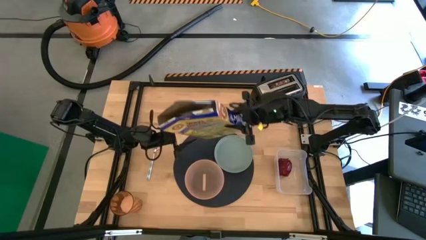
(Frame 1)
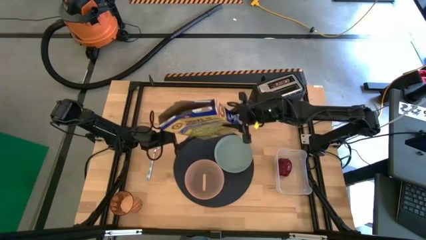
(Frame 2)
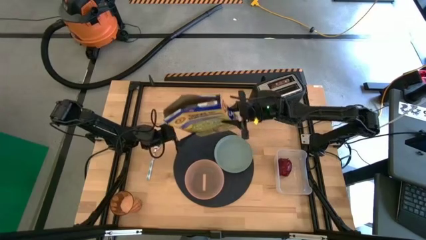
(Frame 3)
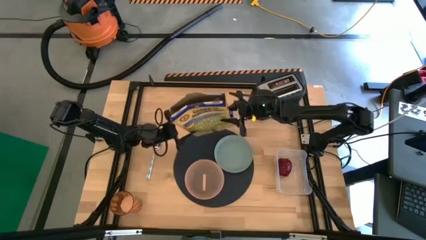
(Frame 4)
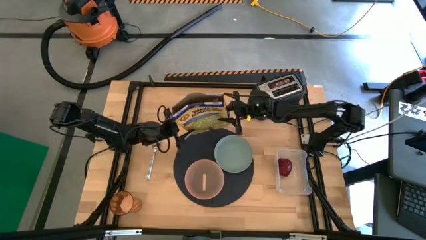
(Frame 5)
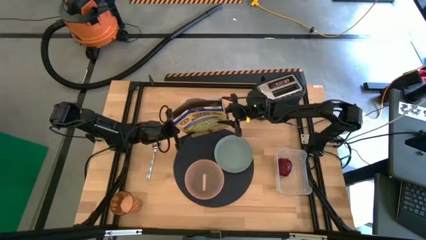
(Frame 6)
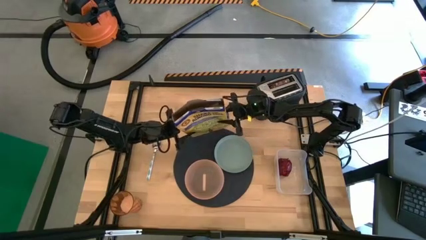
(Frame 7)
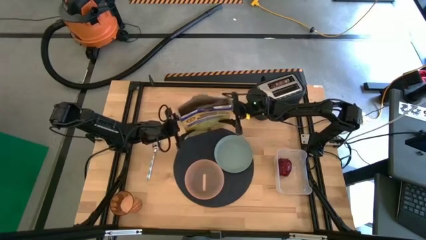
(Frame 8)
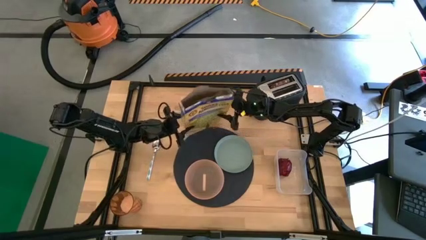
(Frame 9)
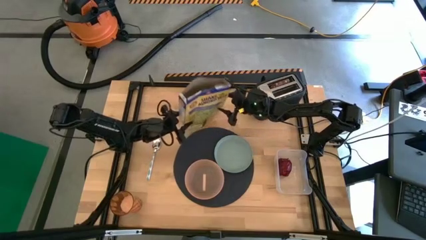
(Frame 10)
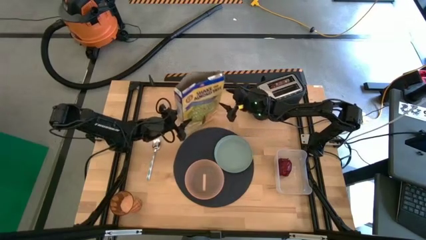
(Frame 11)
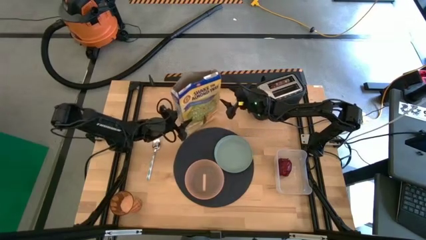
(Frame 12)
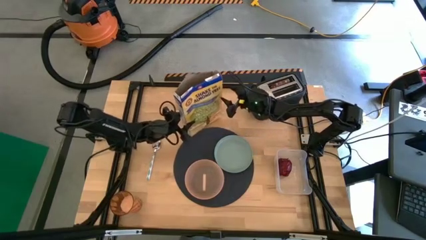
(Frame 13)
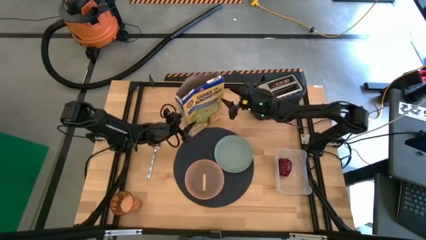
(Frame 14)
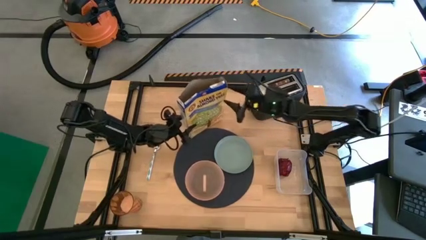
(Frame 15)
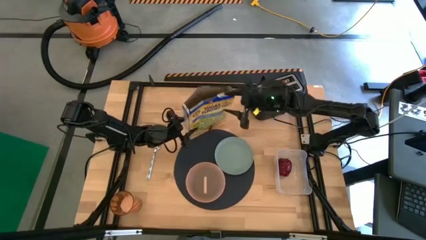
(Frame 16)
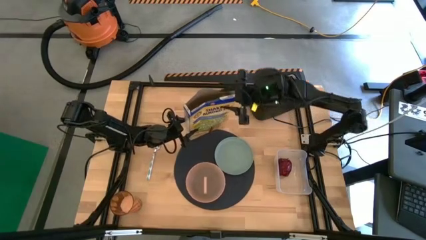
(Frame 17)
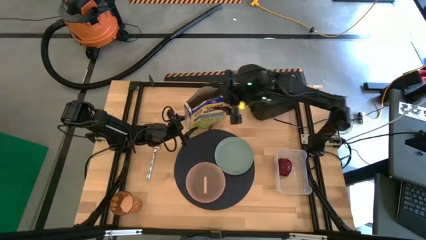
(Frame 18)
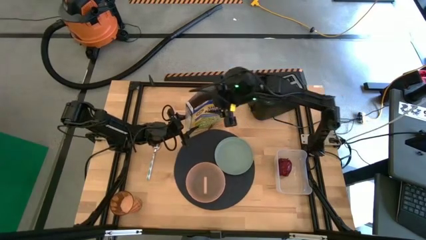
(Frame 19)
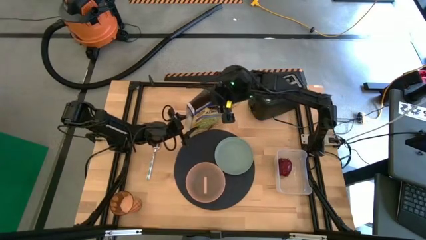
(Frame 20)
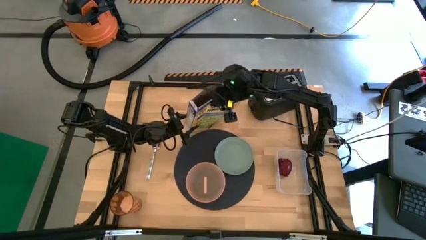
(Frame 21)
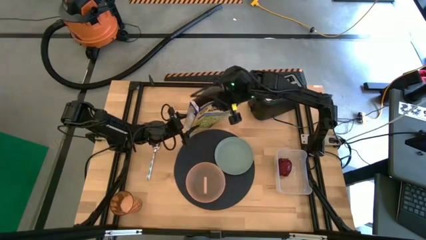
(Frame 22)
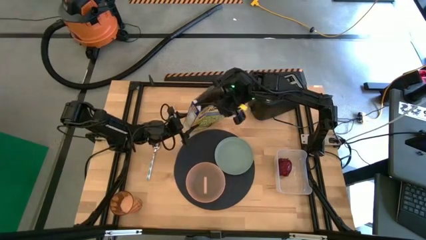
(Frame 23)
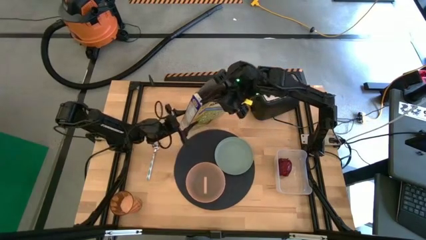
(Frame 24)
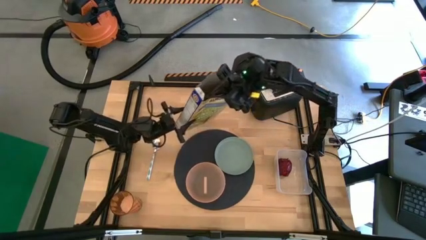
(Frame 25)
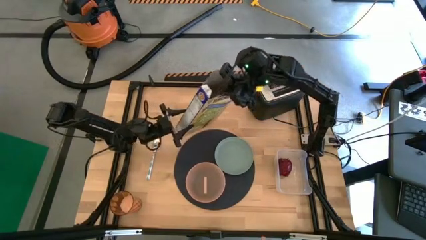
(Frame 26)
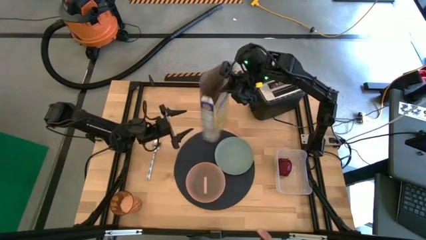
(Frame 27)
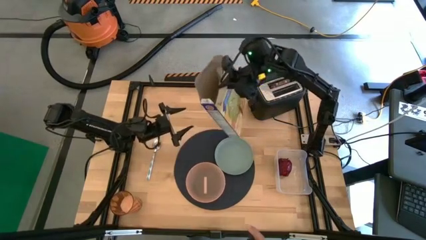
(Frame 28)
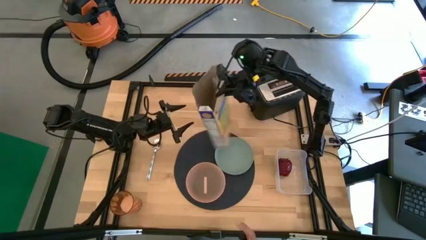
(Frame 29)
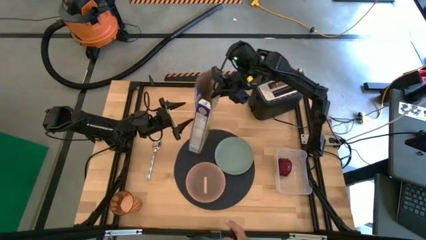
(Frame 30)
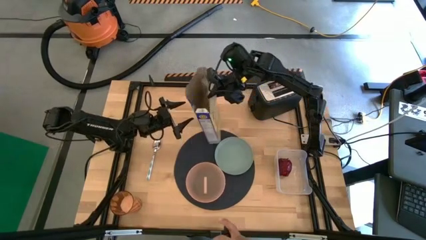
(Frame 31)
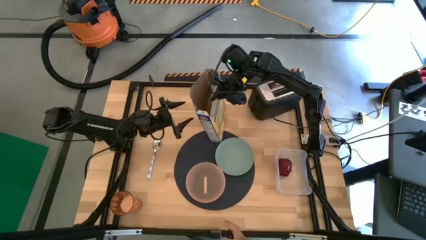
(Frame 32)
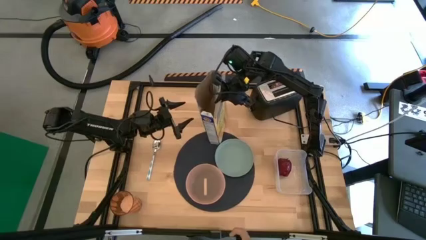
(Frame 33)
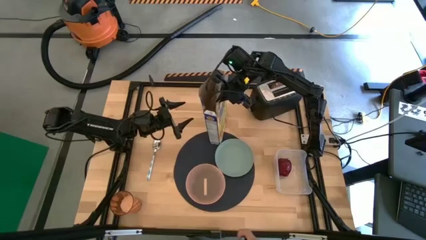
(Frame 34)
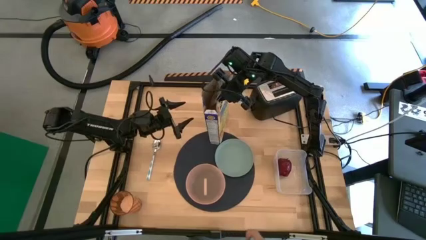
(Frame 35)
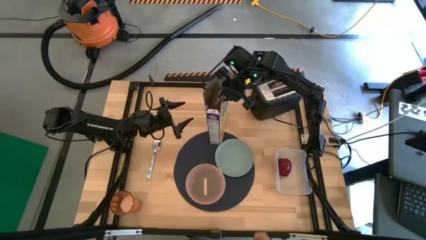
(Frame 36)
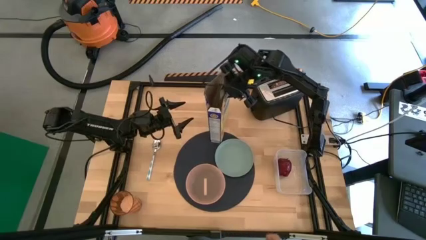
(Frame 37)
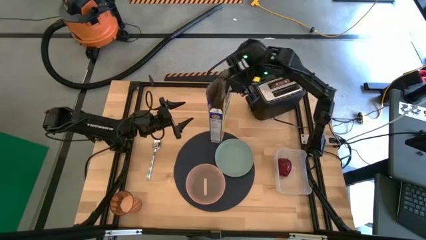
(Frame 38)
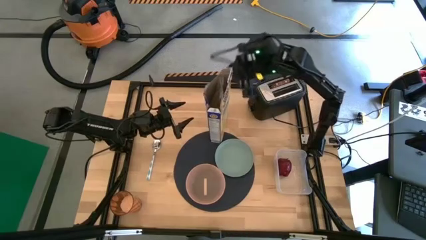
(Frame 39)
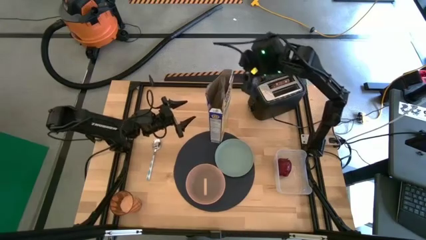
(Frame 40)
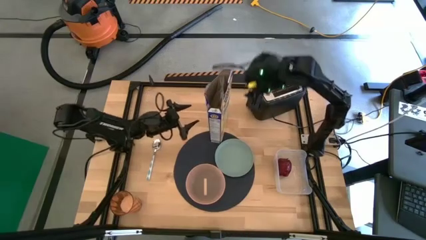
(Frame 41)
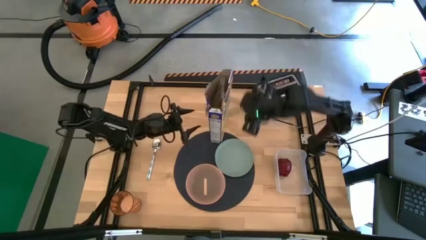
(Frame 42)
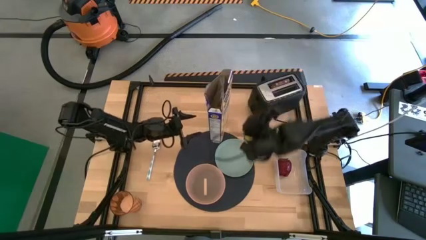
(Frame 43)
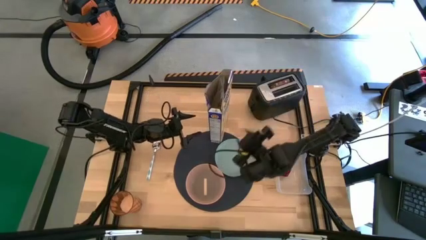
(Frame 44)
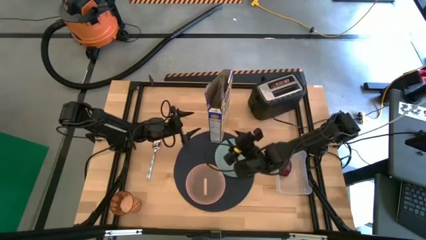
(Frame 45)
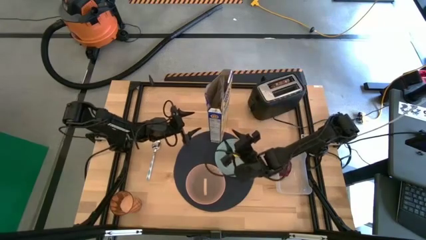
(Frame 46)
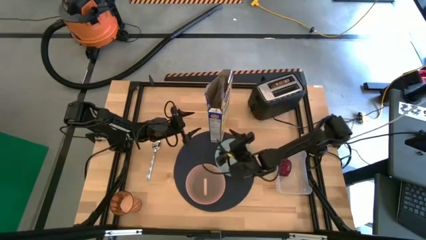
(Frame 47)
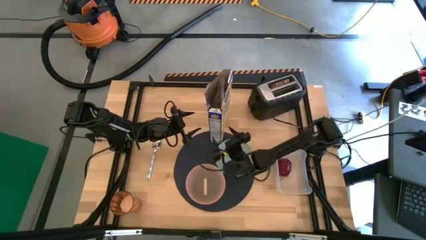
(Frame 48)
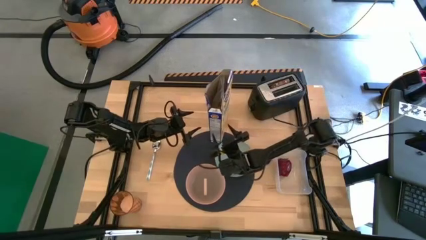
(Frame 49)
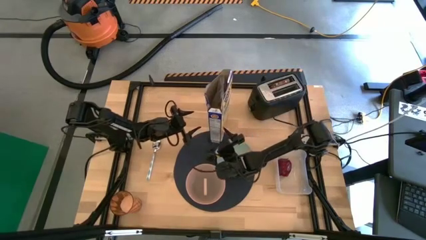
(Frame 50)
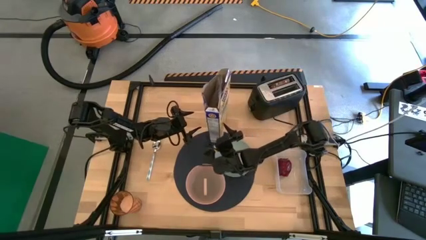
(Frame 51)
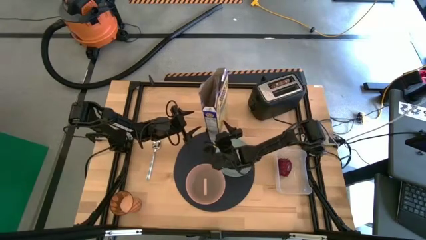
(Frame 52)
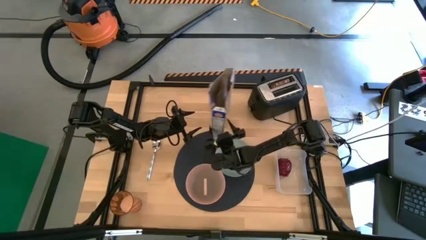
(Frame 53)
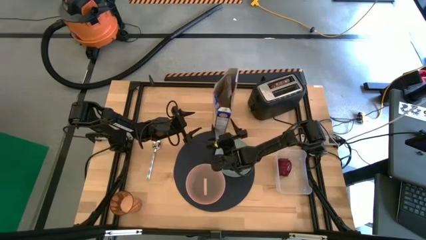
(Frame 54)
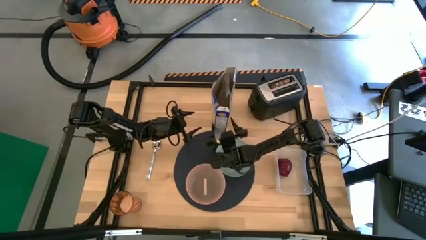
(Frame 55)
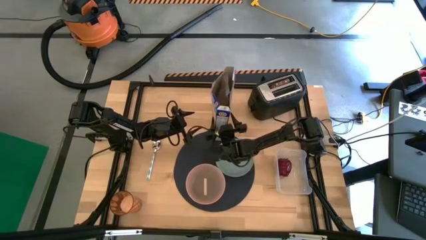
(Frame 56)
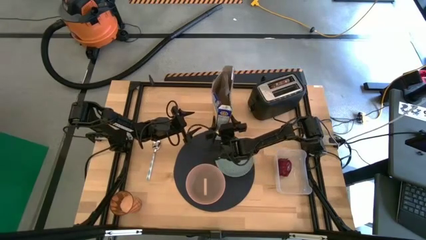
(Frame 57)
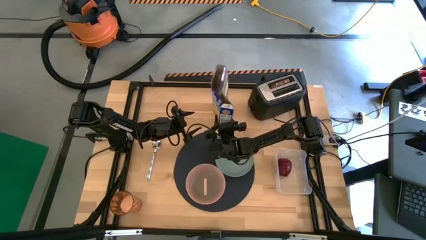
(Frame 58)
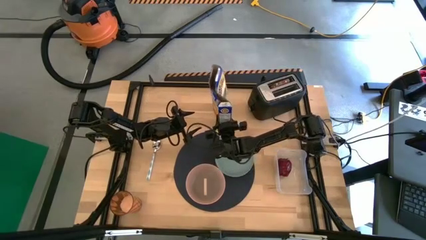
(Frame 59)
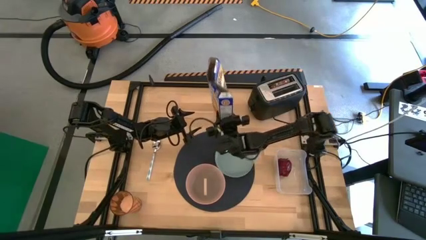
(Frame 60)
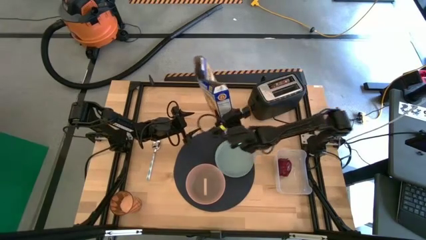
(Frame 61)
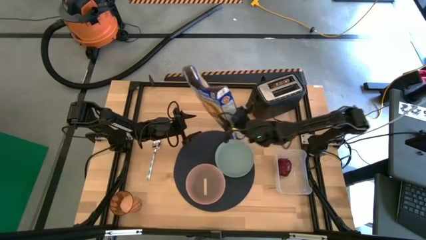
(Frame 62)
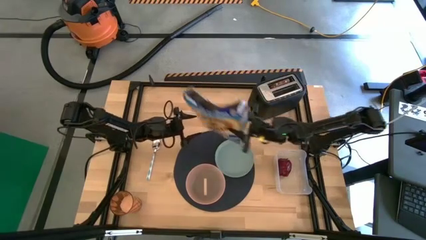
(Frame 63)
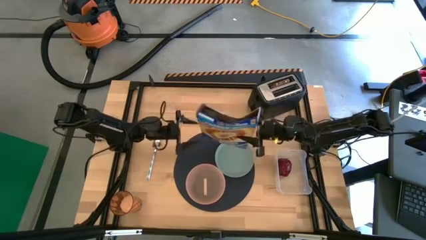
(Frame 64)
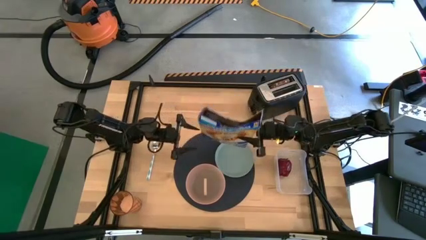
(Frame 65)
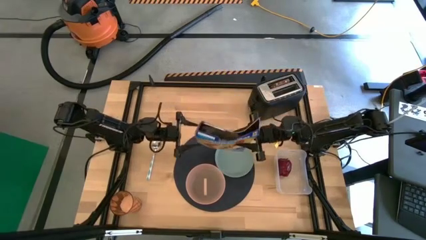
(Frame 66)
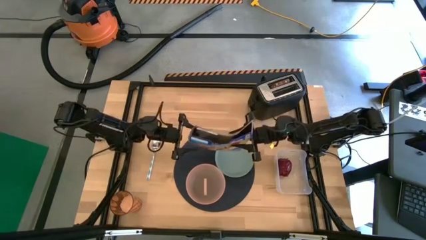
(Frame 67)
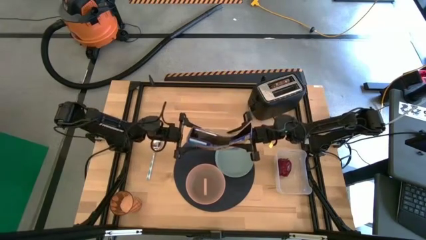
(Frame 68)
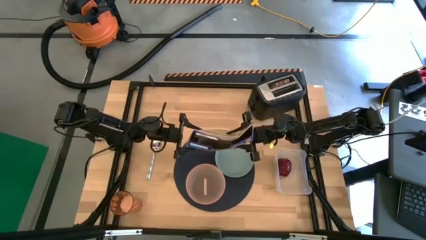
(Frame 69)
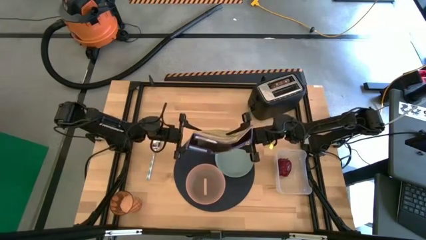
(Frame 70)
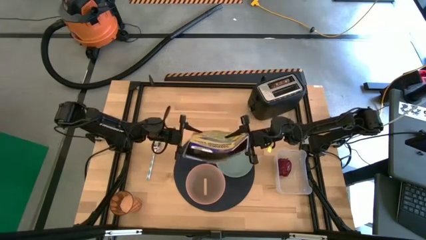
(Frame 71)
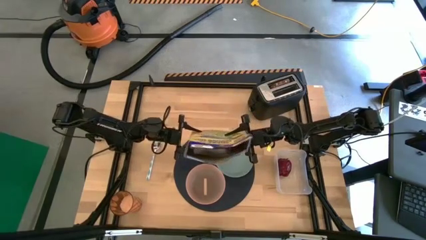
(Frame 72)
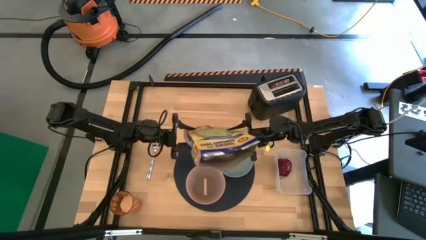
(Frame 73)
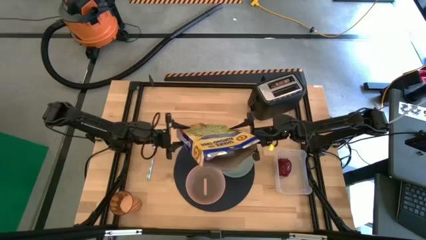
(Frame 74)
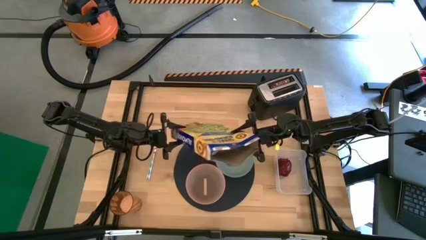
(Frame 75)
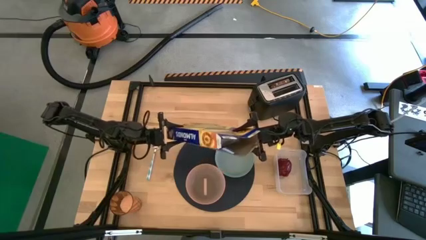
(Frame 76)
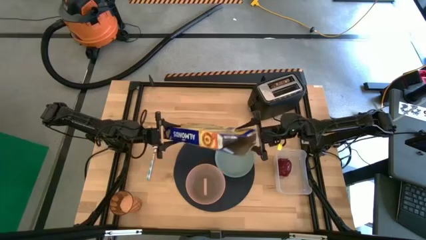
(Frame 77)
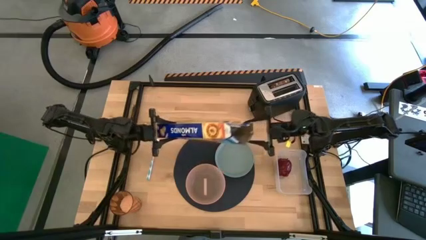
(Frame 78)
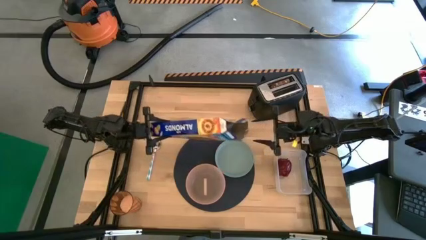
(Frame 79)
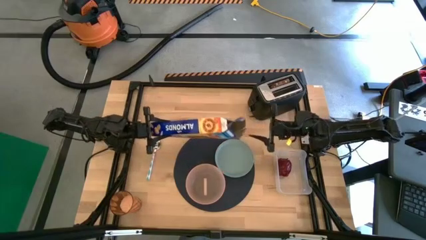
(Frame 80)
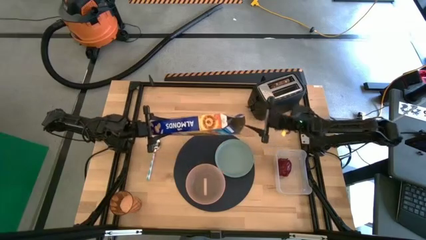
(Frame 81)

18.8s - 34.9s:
Task: Arrange a breakfast setting
Pour the cereal from the yellow cereal box into the pink bowl
